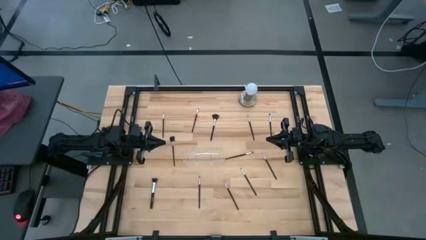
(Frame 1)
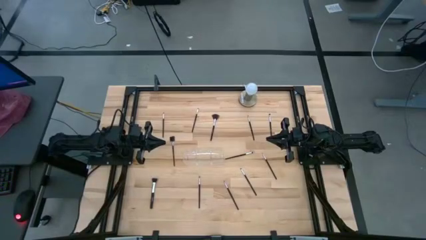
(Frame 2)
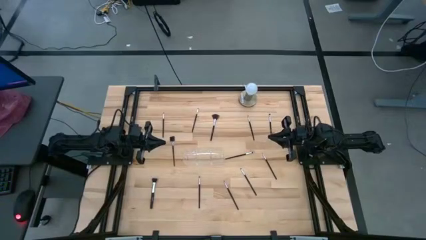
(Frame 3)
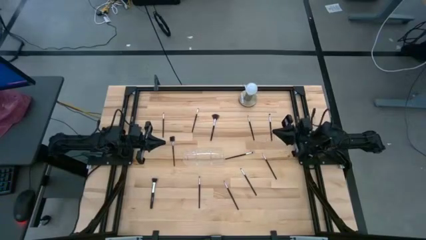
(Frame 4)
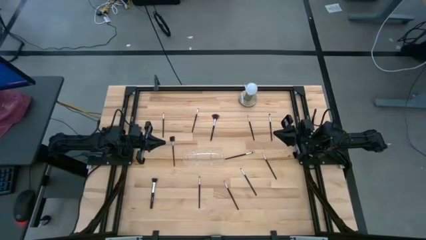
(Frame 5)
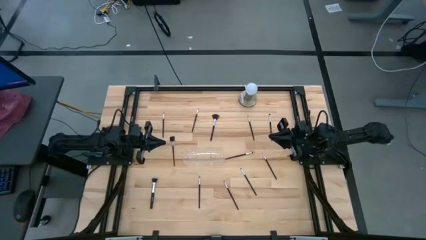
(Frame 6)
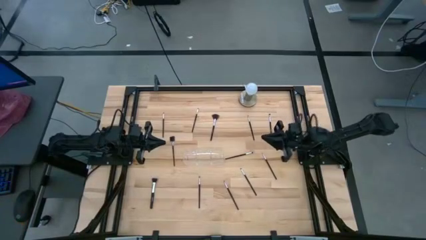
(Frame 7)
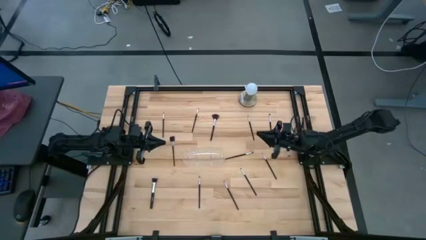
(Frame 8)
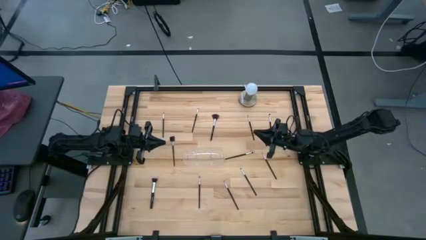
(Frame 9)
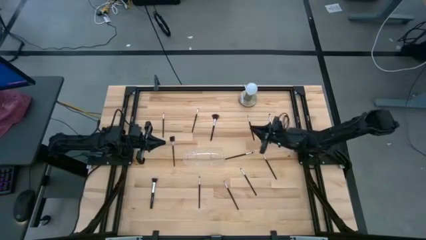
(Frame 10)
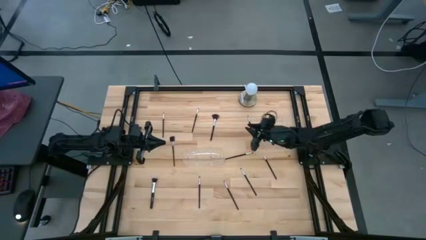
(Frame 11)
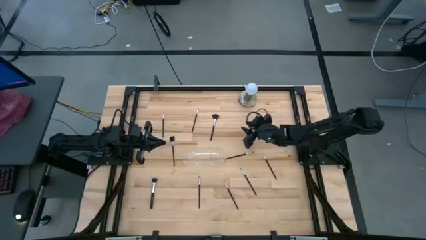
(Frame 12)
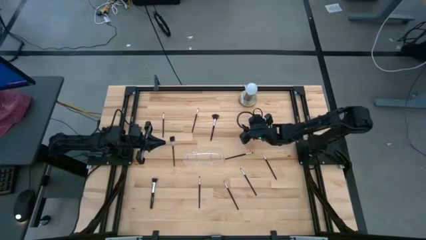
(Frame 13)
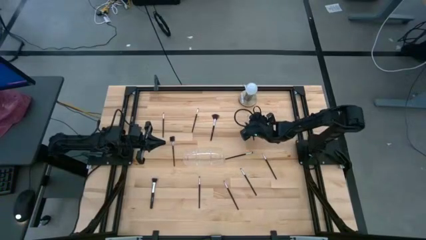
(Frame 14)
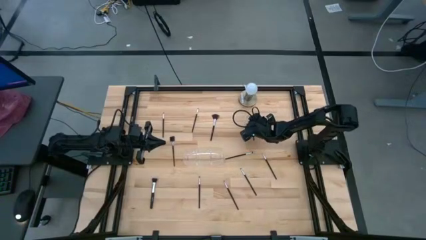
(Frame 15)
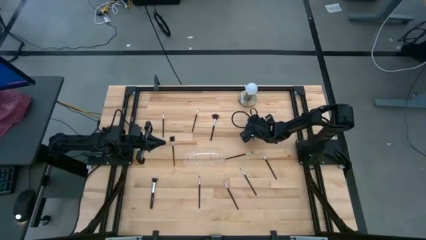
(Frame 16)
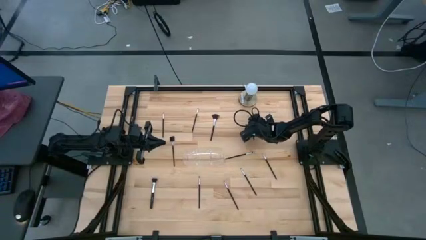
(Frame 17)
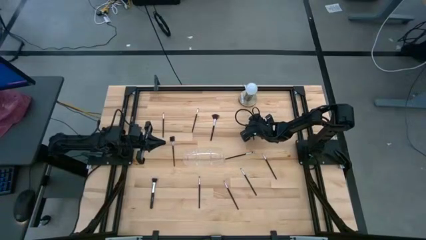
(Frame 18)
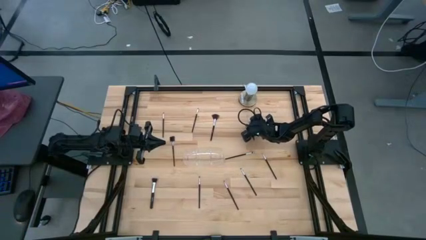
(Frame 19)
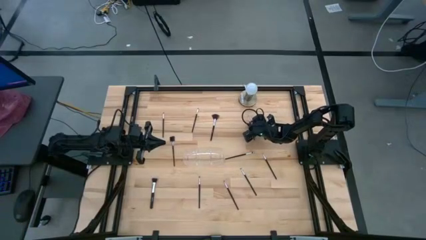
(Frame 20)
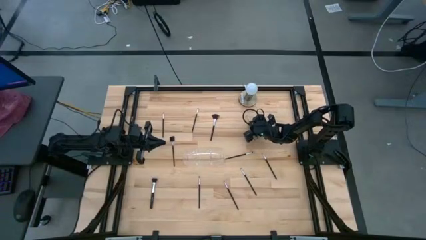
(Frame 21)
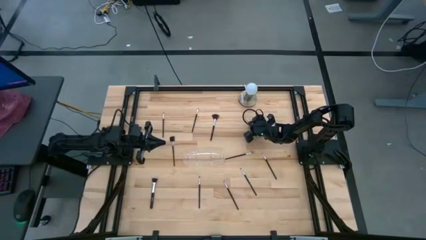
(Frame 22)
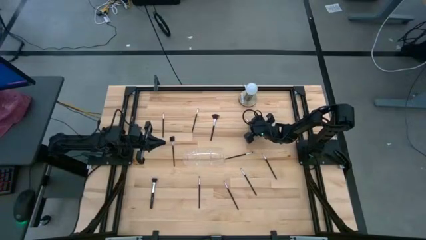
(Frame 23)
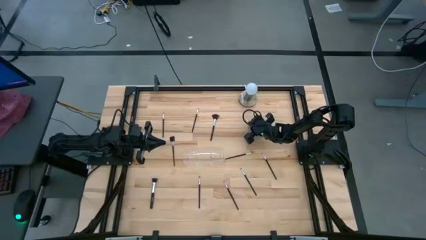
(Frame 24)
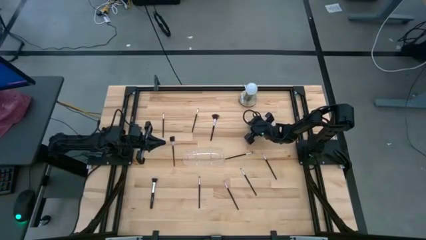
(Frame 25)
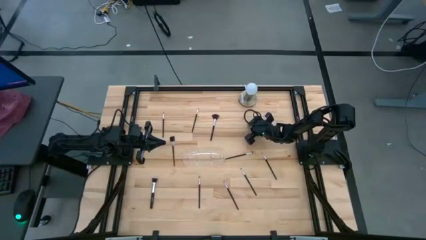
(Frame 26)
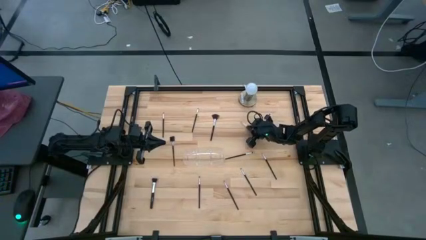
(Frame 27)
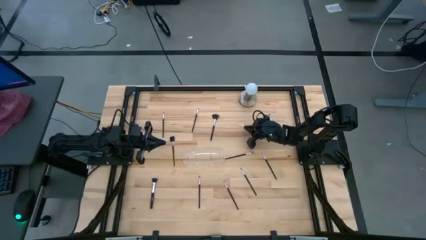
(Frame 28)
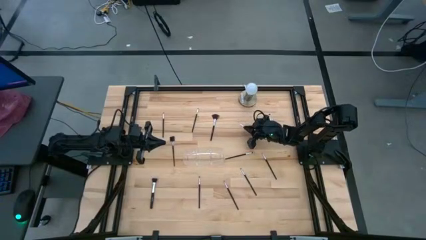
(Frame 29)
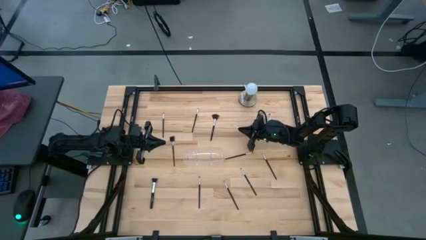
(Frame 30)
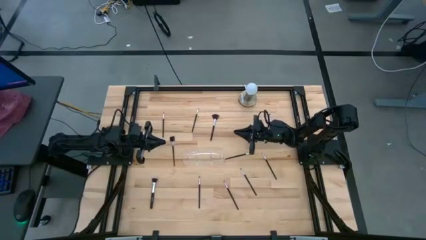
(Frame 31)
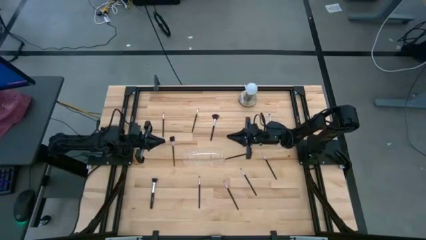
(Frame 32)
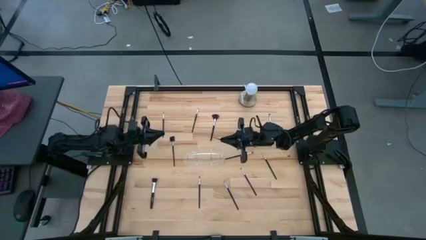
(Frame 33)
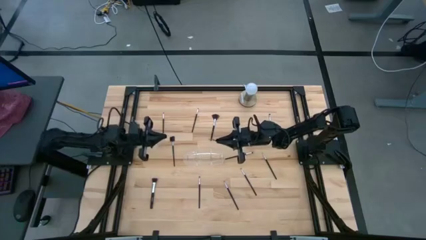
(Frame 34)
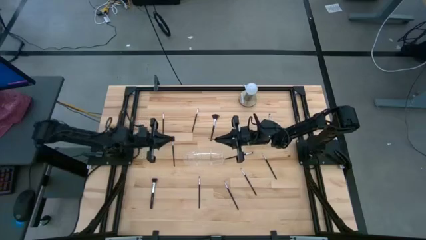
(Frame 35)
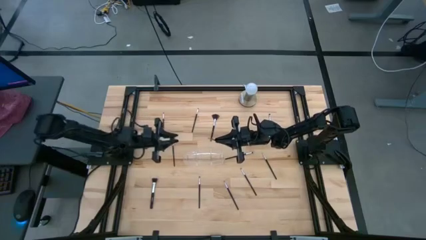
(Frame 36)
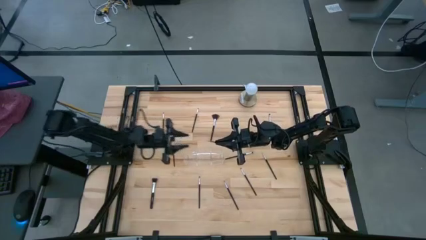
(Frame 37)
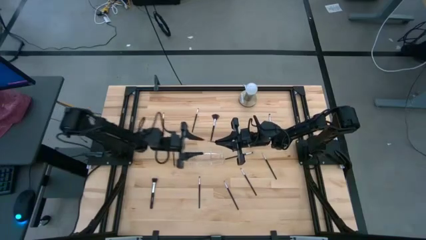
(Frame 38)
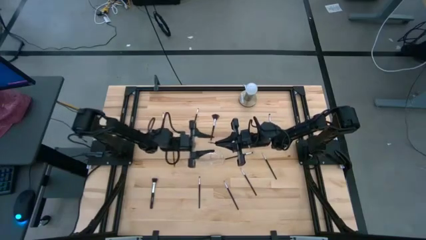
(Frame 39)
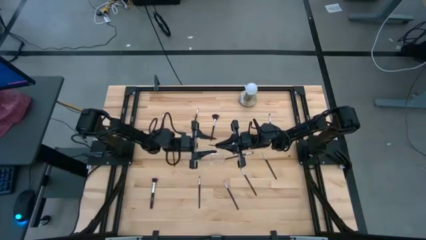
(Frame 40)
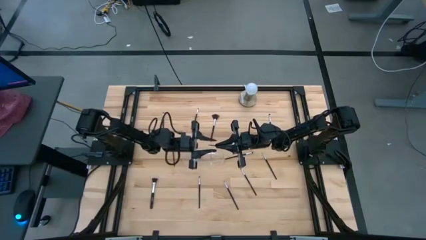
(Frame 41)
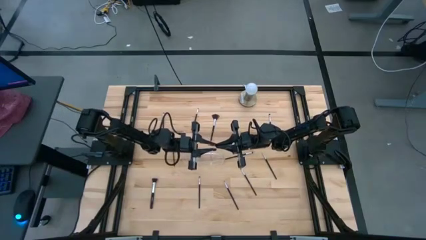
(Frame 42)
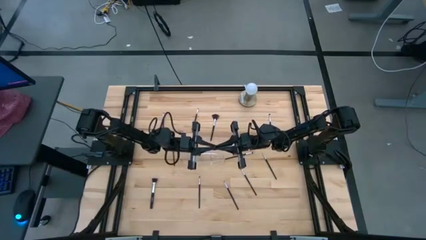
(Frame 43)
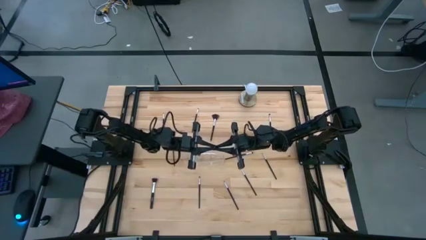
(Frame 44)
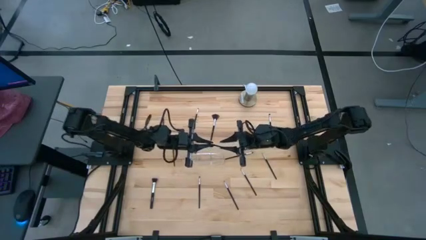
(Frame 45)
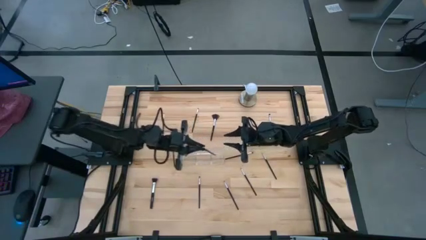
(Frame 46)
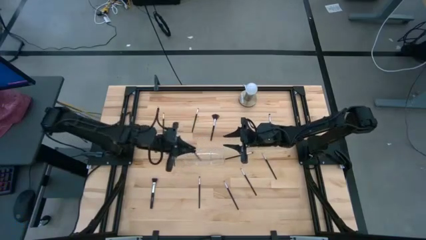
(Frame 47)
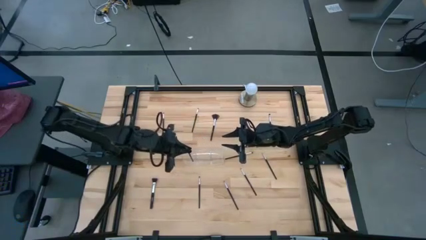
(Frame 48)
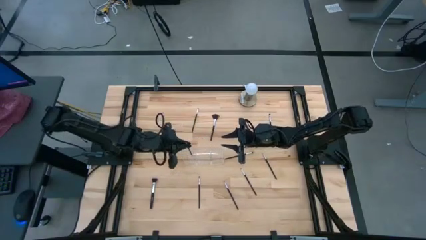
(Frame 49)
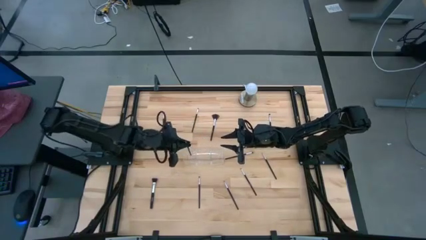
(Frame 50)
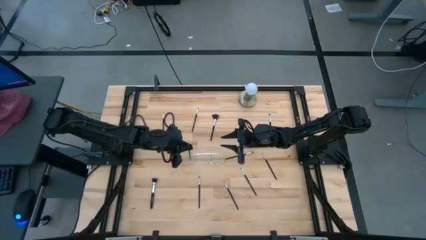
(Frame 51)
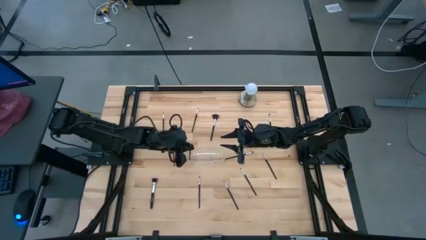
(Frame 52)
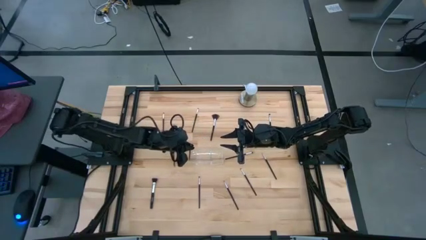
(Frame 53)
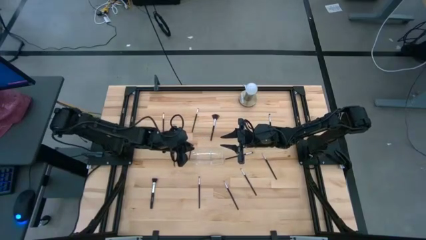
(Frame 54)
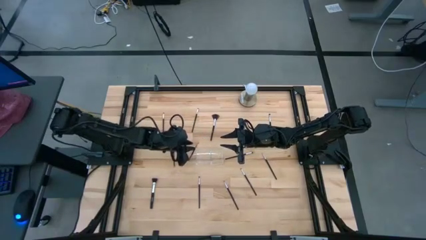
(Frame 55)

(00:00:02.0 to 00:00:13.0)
Task: Put items in baskets/containers
Put the liner brush into the transparent organizer
